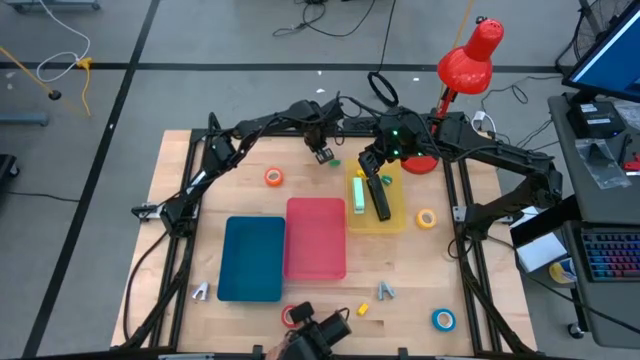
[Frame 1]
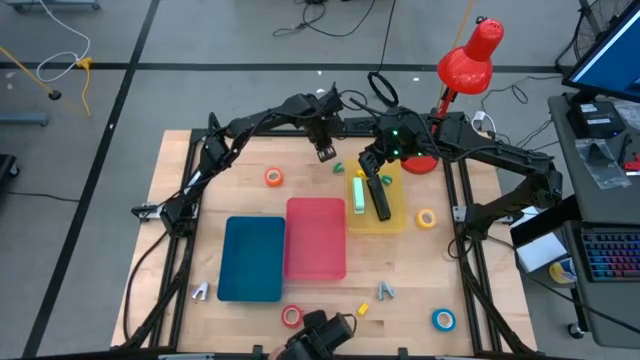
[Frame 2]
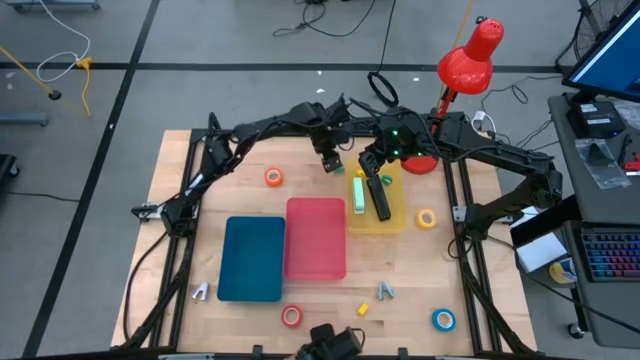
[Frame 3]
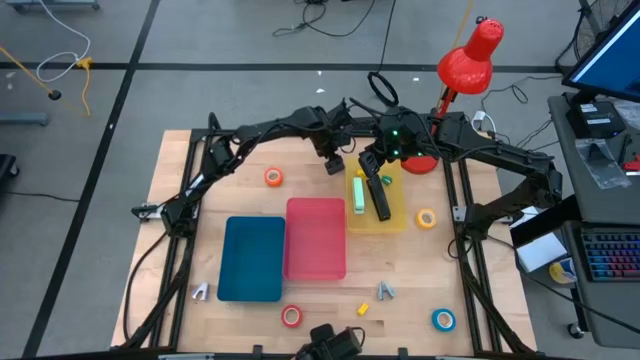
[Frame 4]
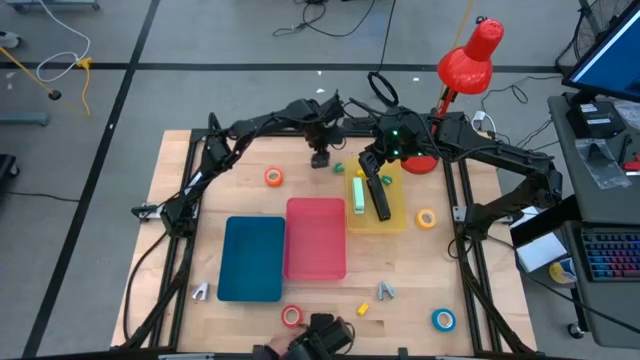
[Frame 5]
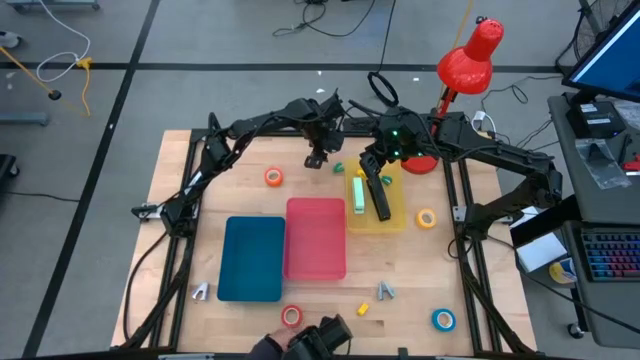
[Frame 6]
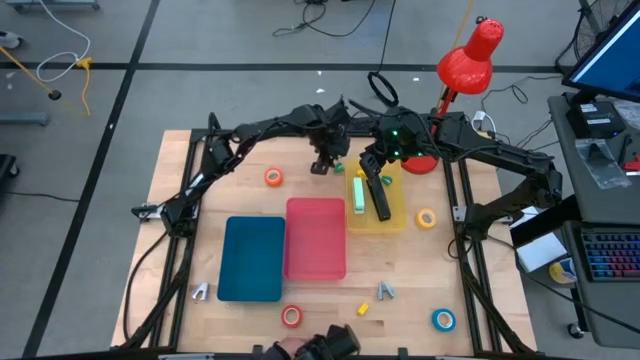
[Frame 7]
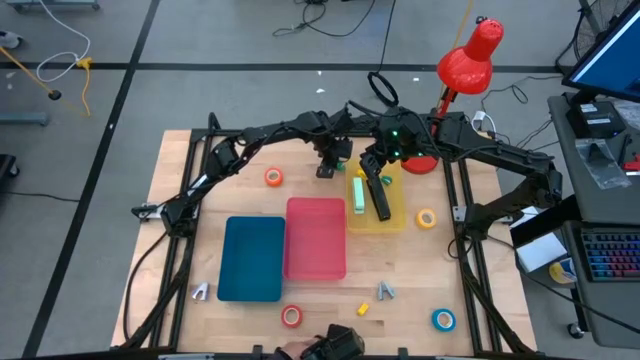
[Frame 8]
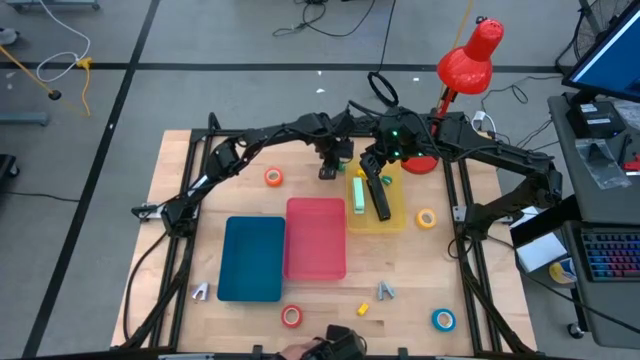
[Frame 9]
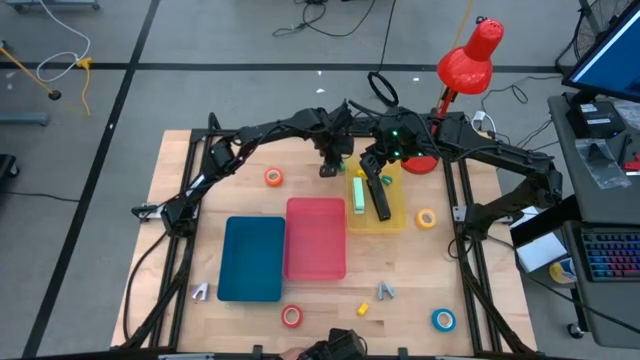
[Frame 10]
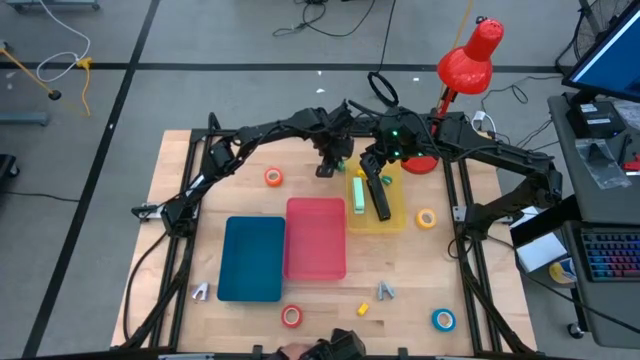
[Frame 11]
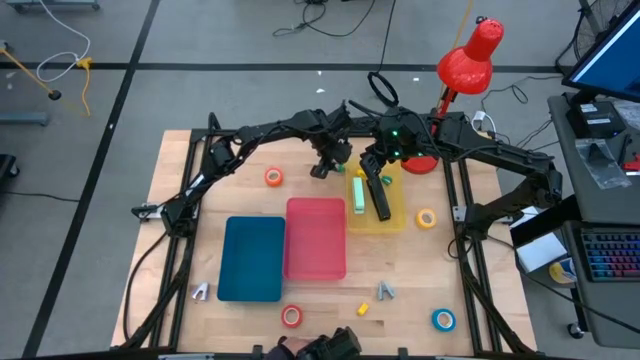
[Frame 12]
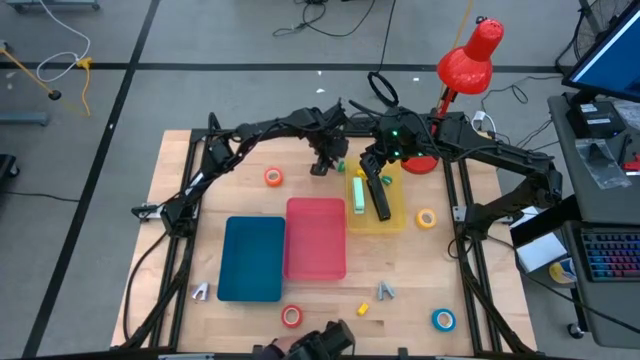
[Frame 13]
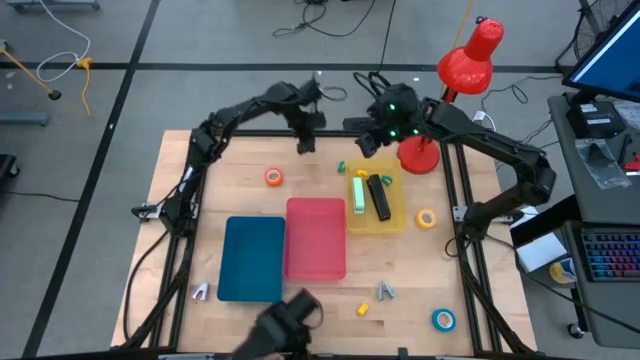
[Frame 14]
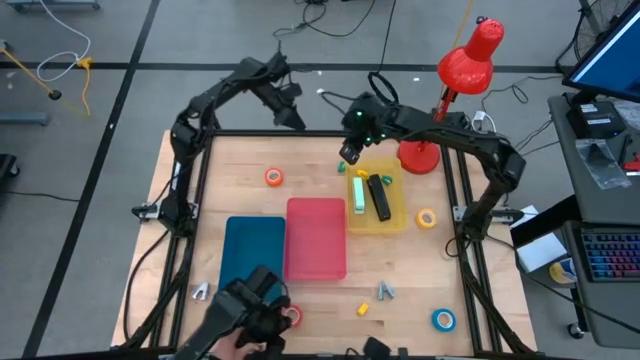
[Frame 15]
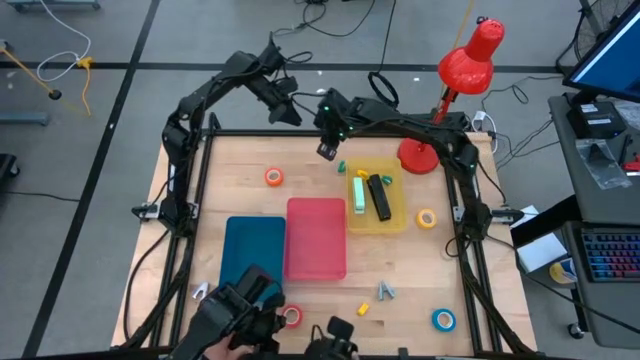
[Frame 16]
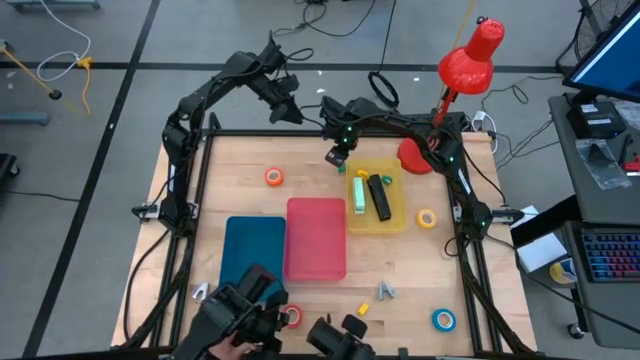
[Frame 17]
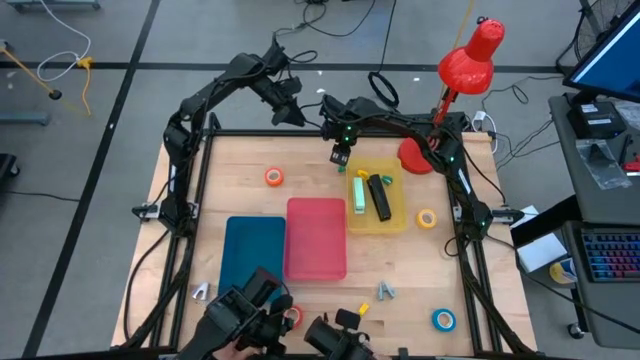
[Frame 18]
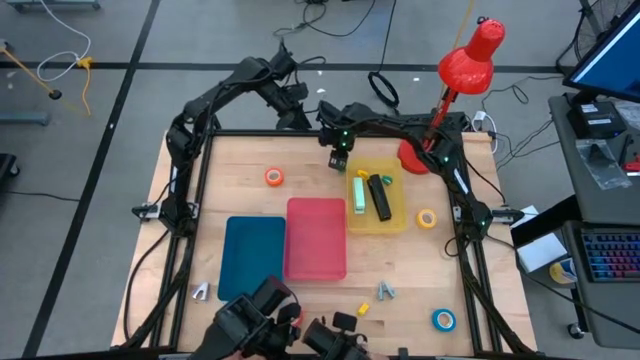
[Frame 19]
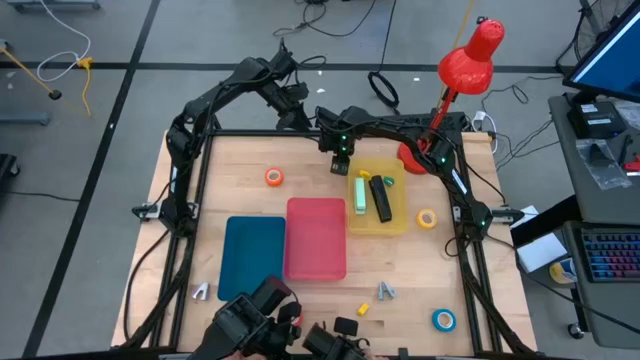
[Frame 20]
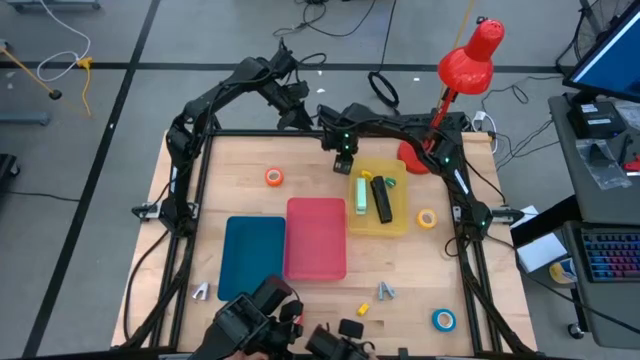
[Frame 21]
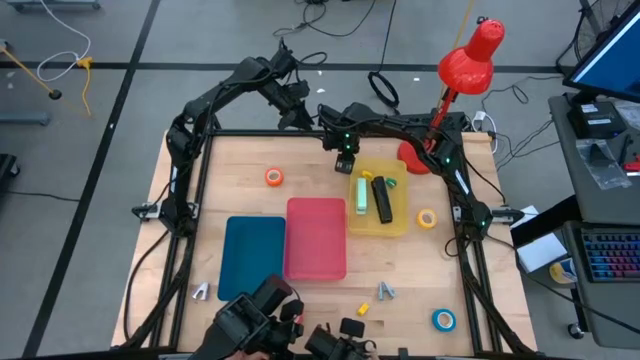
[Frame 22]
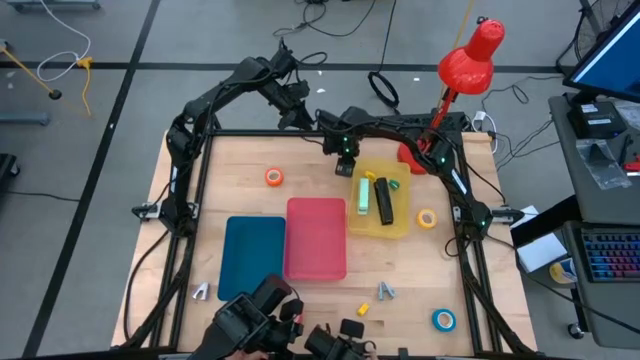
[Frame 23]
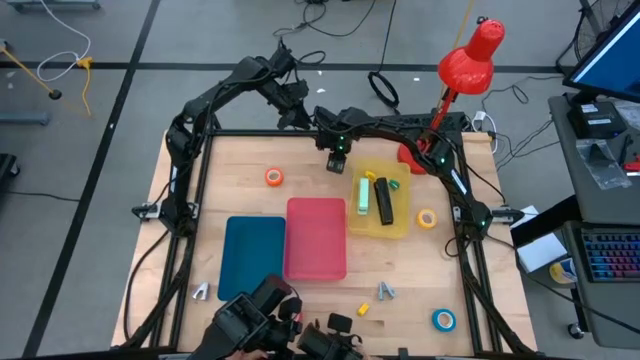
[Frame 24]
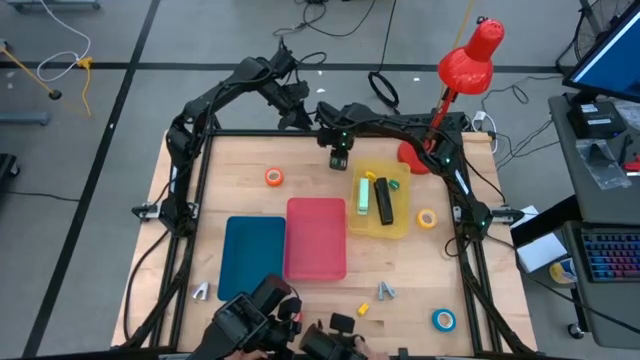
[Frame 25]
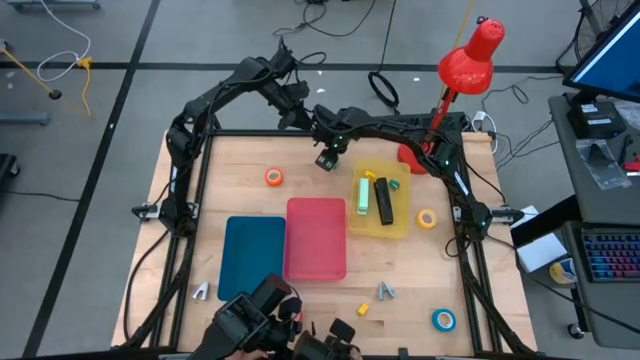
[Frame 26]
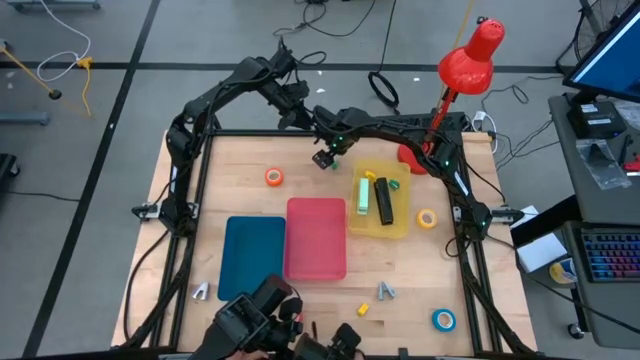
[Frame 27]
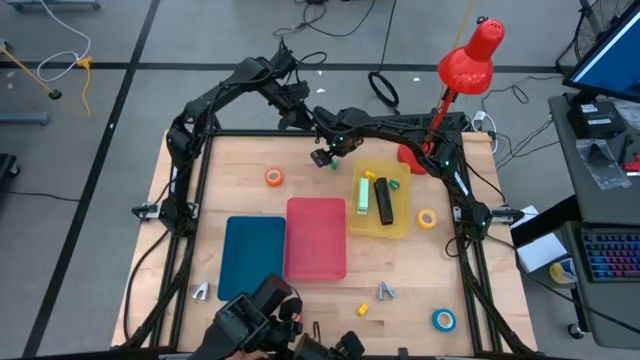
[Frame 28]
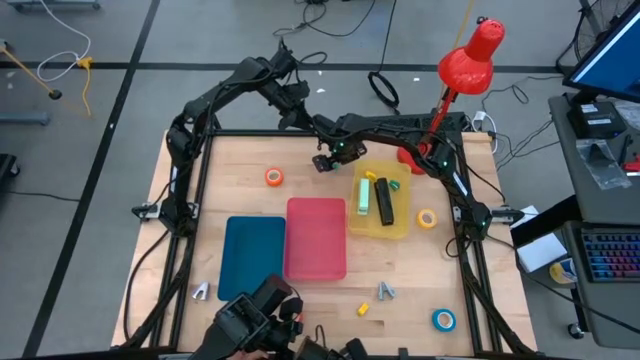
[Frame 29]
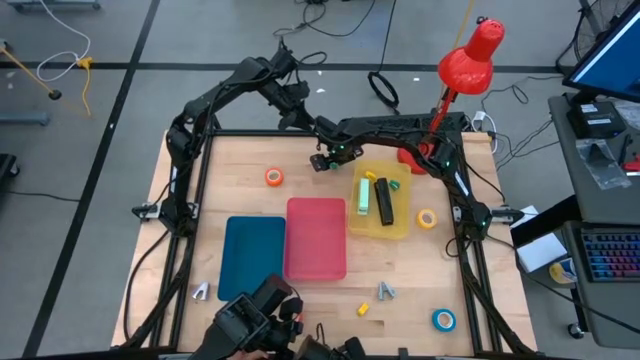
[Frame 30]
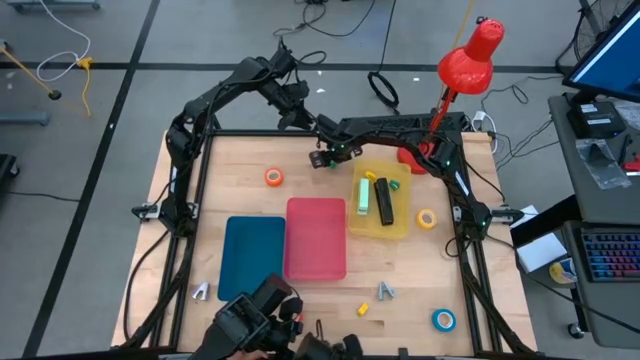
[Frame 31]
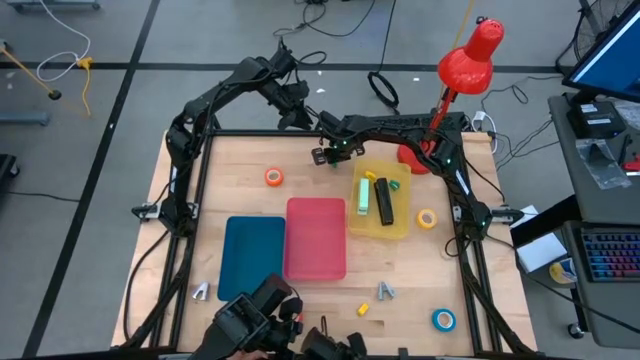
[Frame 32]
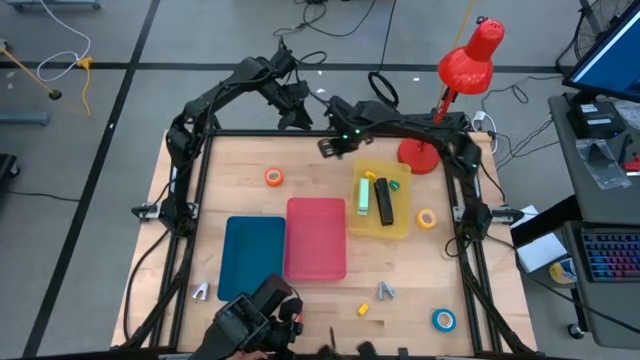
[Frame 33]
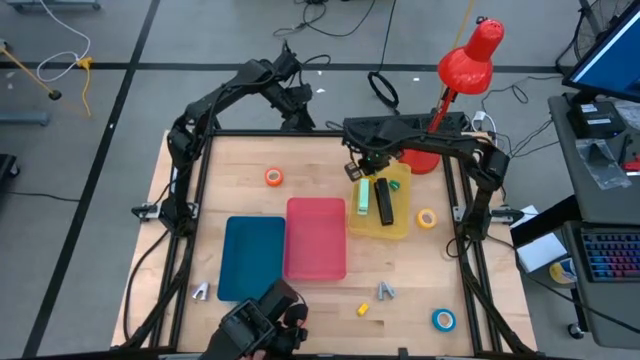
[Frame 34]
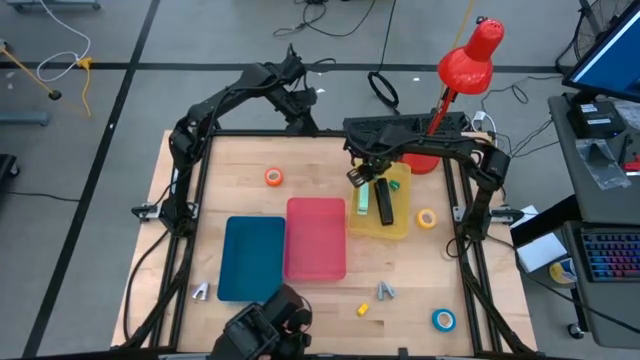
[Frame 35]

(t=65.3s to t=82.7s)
Task: Pick and place Stapler, Stapler remover, tape
Put the green stapler into the yellow bin

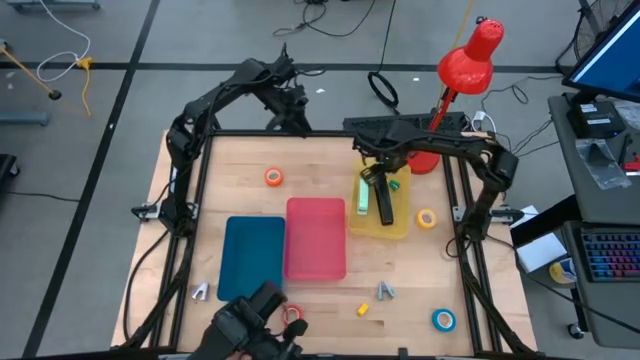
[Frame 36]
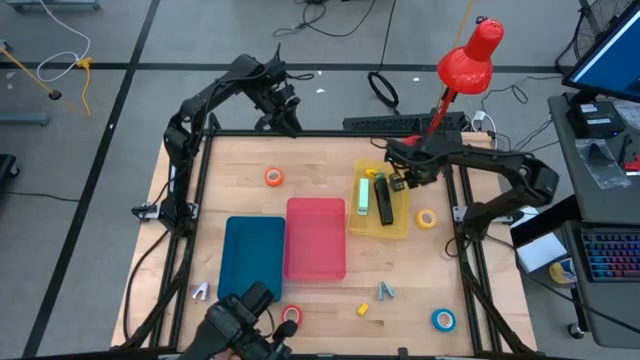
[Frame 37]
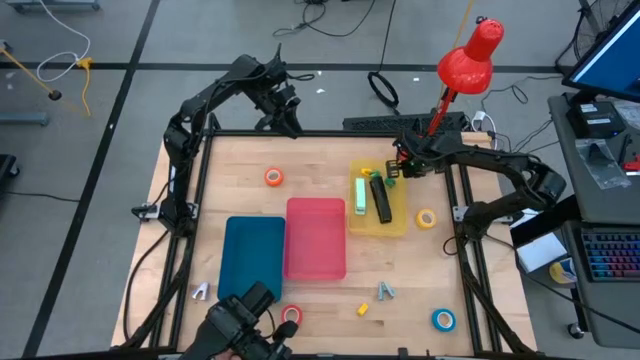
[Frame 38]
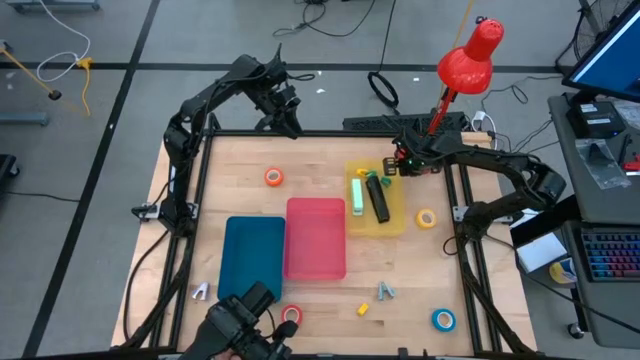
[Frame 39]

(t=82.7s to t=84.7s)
Adjust the yellow bin on the table

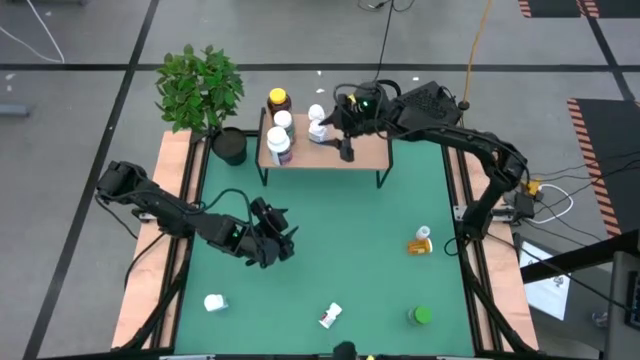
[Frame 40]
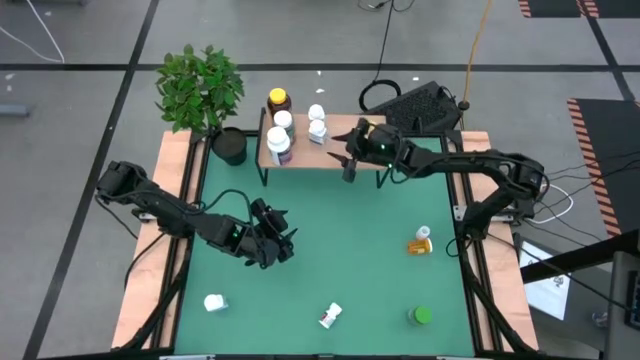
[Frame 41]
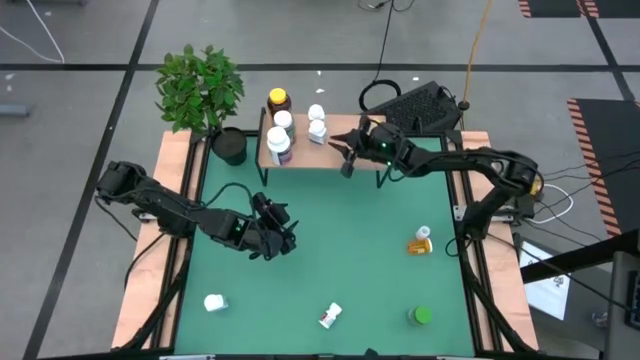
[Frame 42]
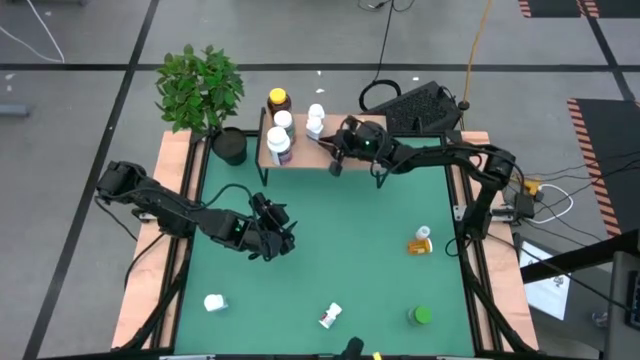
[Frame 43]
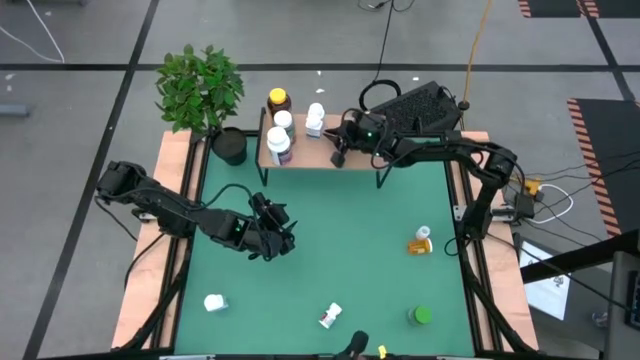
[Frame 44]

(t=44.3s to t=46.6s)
Task: Pick and place medicine bottles onto shelf by color
Adjust the white and blue medicine bottle on the shelf
